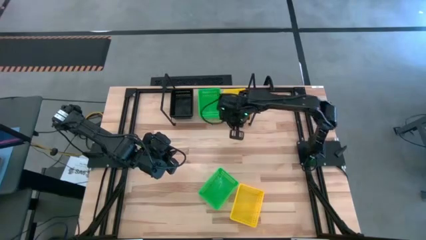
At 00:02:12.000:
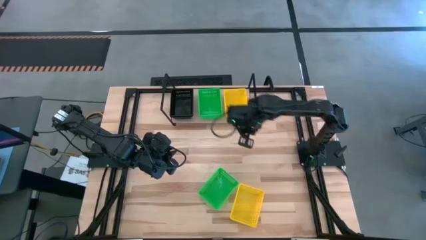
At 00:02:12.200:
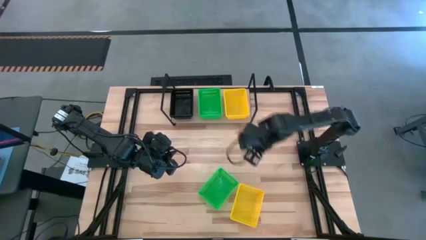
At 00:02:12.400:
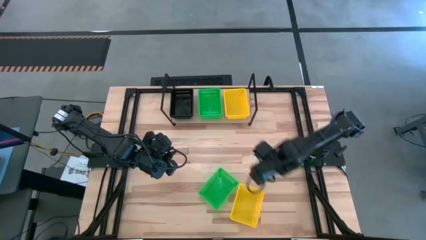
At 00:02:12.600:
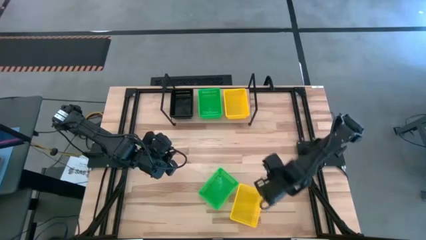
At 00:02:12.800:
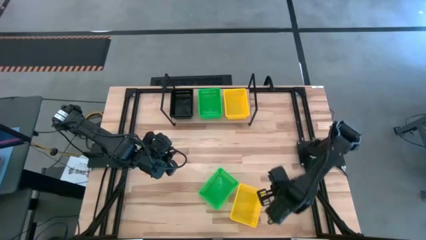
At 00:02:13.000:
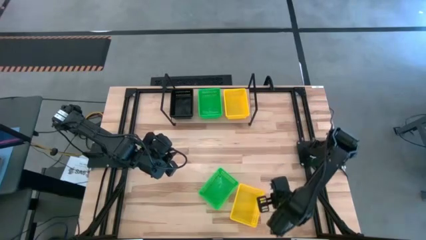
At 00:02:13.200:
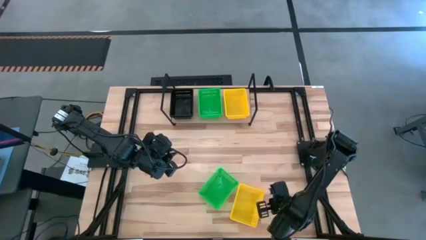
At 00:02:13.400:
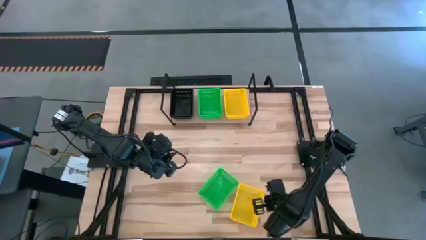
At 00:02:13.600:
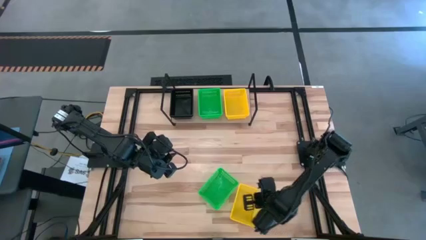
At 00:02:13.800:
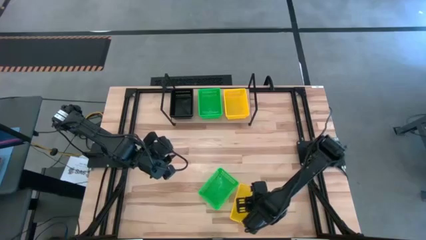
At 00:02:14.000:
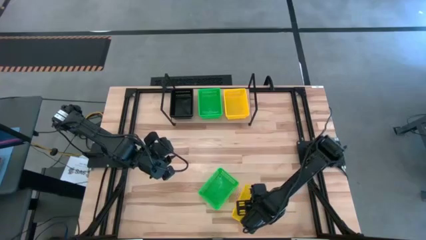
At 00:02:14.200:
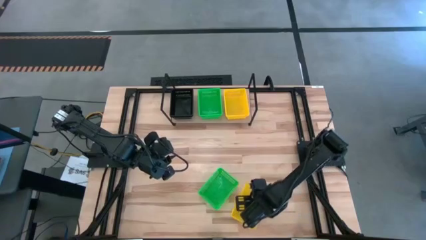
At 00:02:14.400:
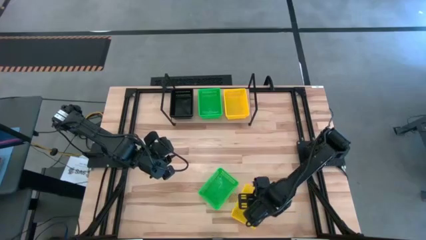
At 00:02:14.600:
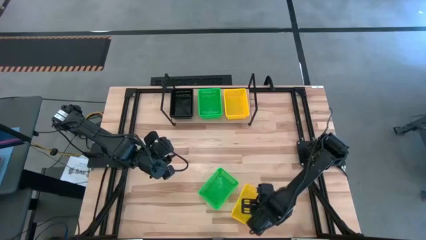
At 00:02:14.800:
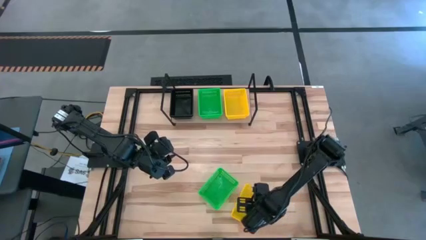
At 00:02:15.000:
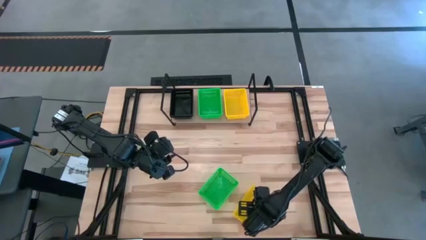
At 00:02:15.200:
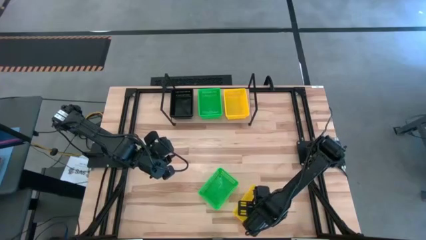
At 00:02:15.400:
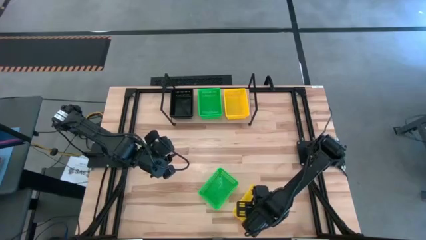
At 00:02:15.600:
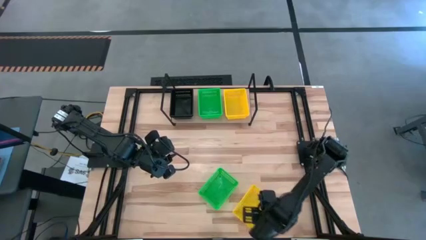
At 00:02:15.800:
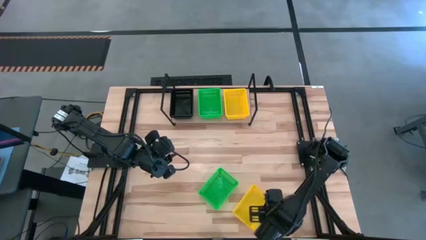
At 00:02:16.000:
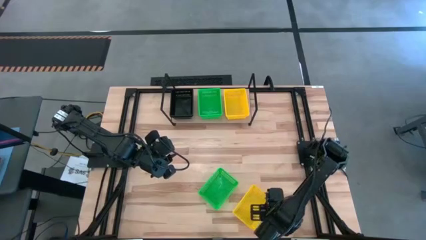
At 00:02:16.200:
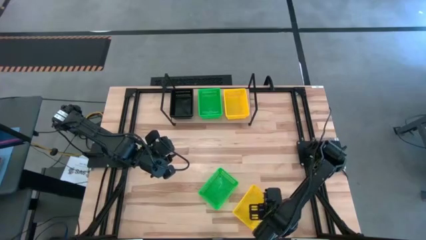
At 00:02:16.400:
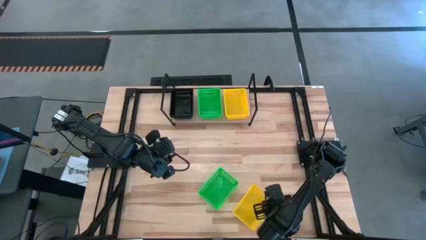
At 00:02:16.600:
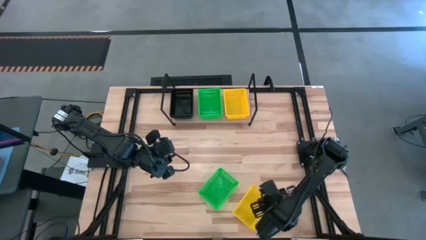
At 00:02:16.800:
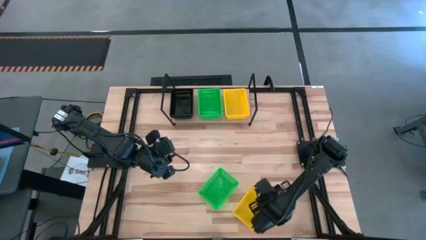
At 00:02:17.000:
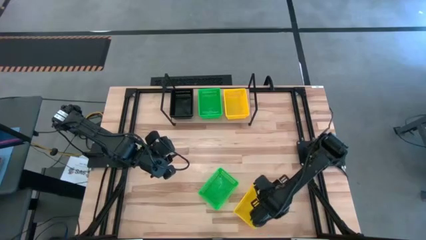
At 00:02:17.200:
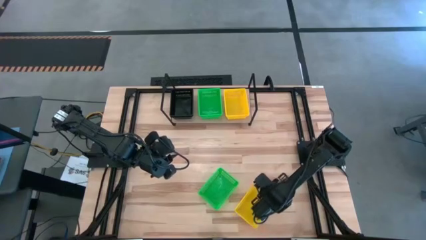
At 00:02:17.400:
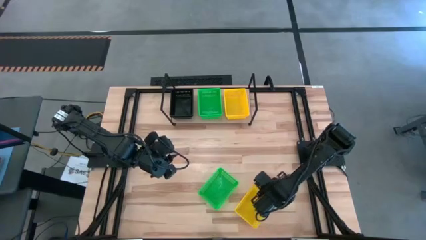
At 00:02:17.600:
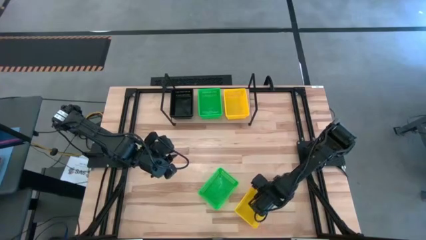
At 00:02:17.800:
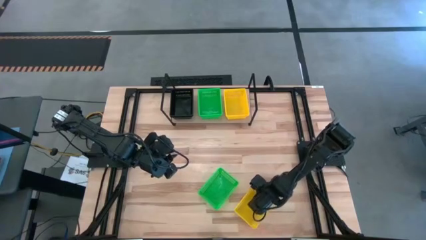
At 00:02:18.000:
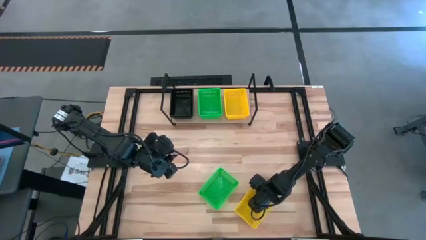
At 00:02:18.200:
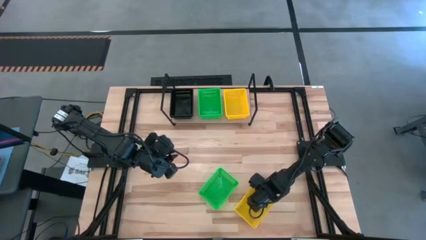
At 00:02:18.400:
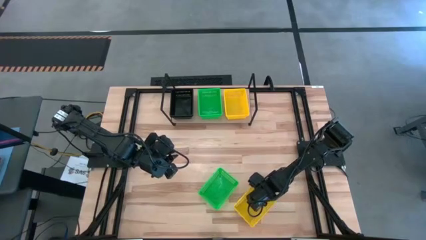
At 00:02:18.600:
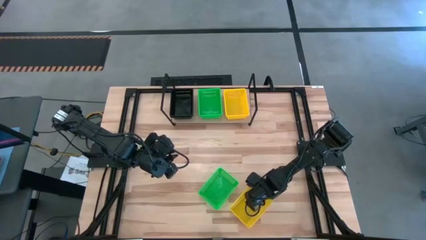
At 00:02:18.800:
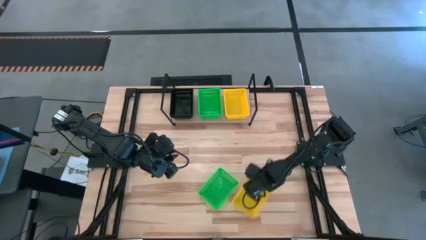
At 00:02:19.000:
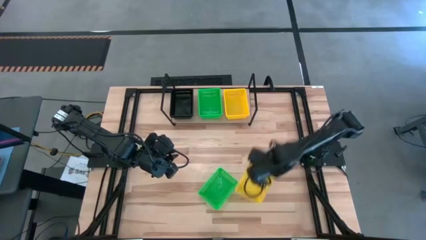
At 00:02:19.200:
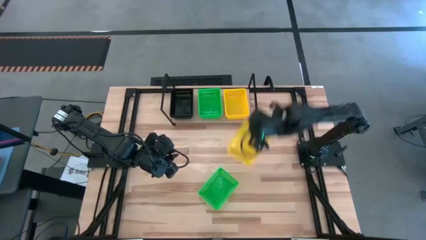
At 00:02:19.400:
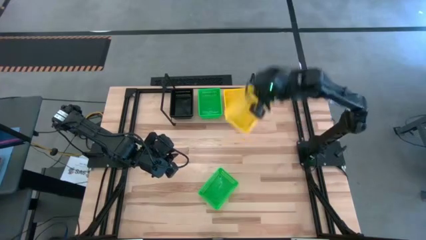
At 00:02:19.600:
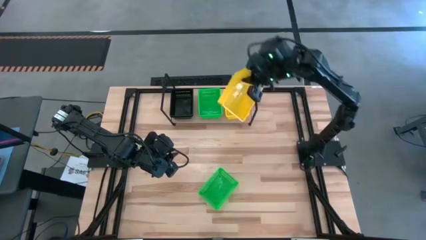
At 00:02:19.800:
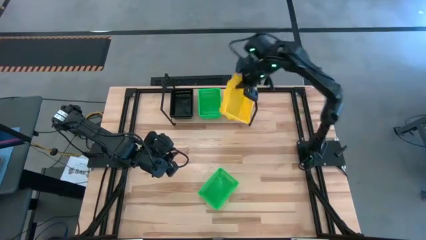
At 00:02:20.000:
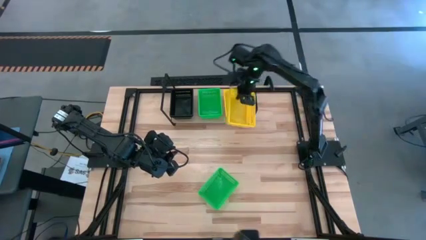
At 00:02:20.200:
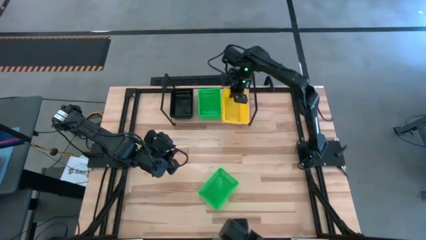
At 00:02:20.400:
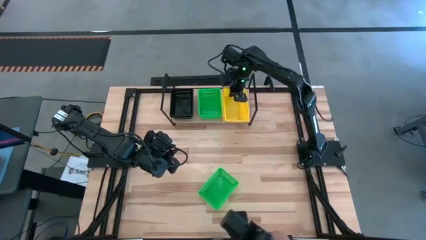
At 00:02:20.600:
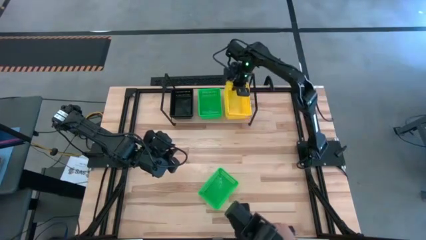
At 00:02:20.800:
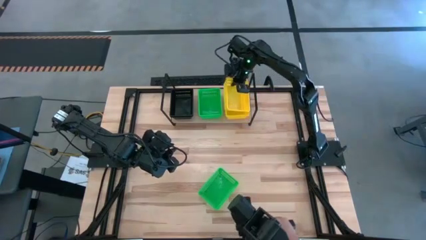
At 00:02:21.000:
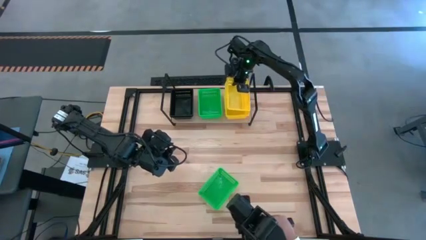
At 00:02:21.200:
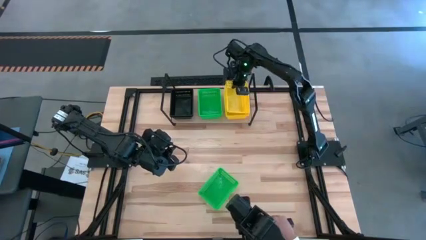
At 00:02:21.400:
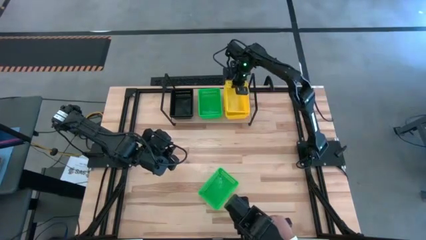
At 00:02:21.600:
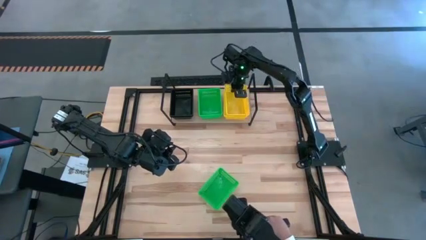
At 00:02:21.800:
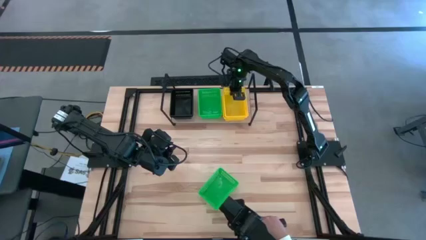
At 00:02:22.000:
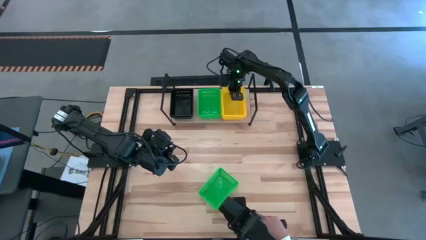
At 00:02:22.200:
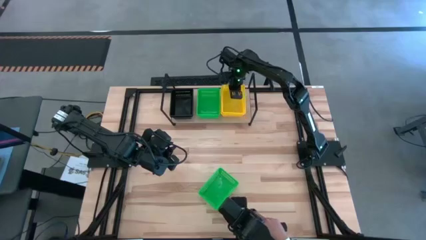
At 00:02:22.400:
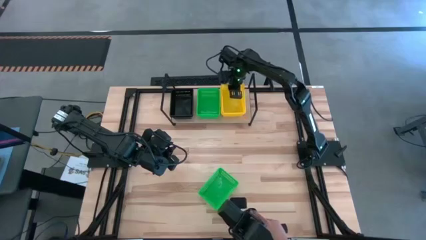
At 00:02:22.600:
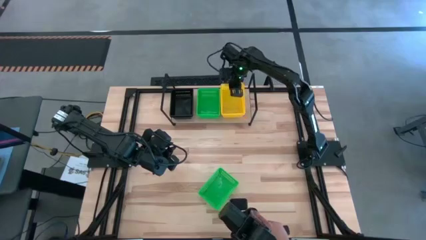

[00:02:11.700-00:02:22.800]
Task: Stack baskets on shelf by color
Stack the yellow bin on top of the yellow bin on the shelf
